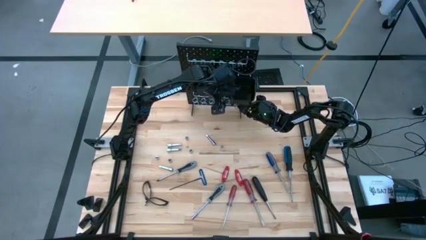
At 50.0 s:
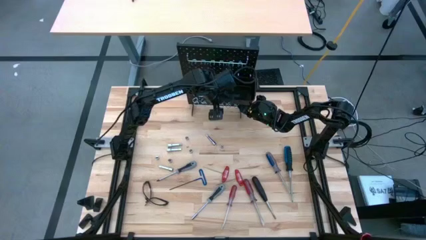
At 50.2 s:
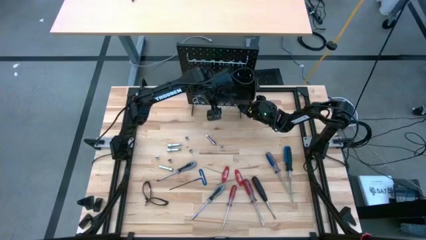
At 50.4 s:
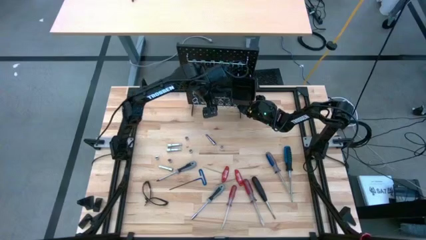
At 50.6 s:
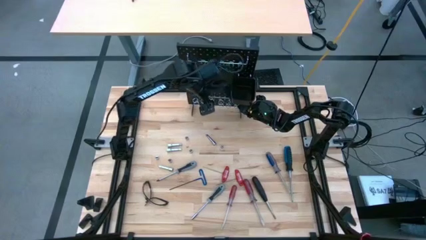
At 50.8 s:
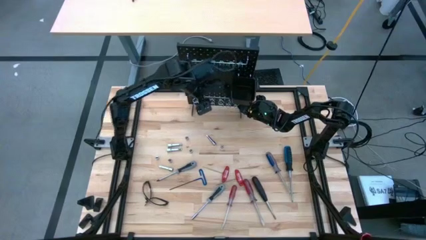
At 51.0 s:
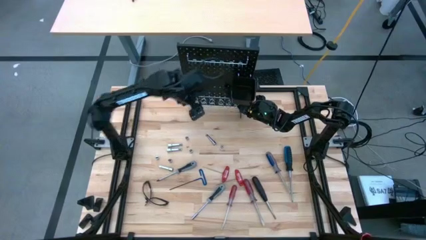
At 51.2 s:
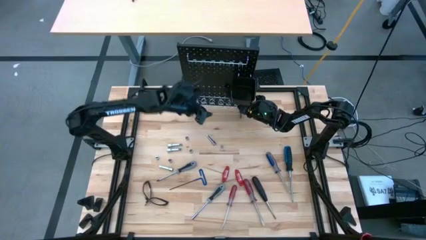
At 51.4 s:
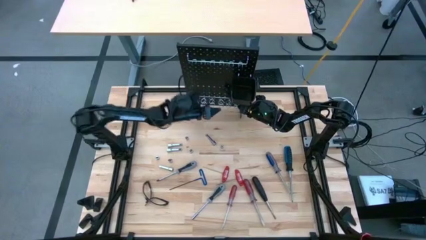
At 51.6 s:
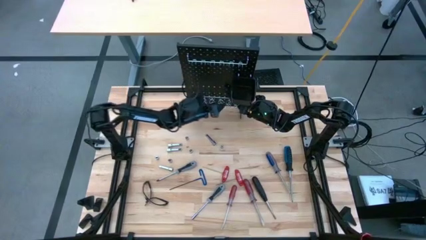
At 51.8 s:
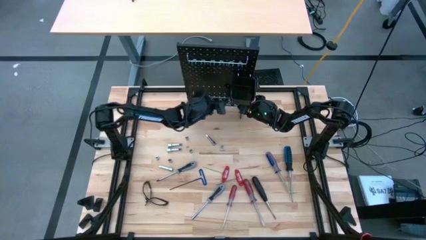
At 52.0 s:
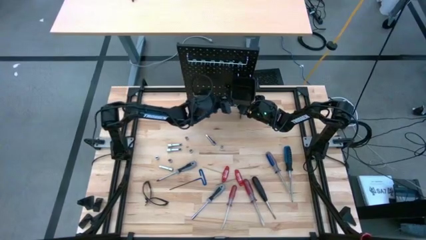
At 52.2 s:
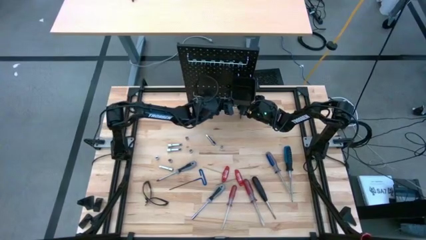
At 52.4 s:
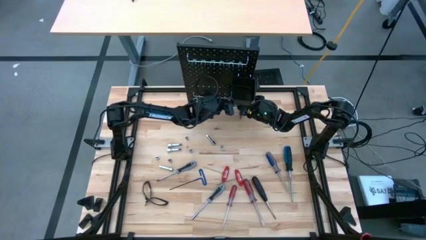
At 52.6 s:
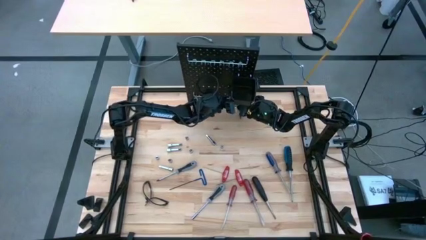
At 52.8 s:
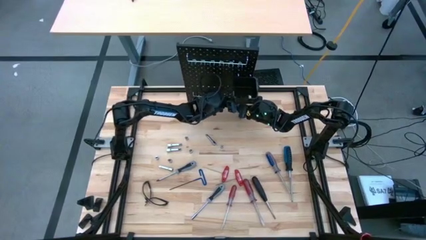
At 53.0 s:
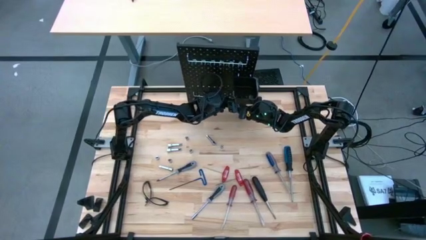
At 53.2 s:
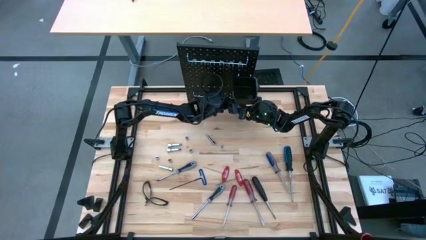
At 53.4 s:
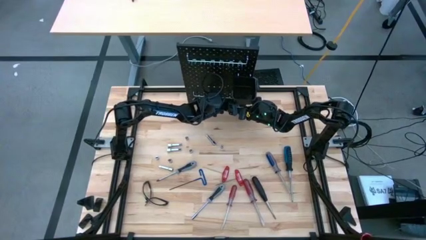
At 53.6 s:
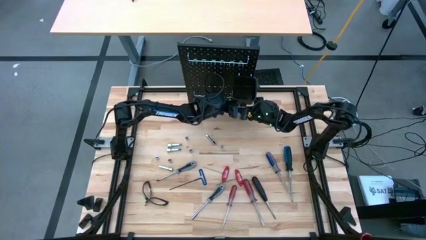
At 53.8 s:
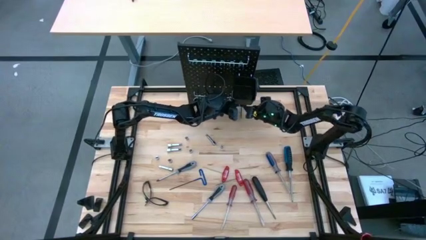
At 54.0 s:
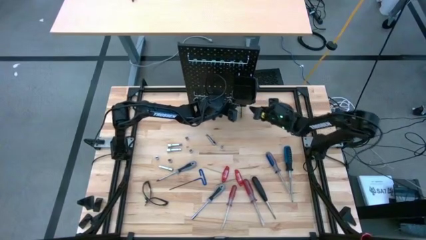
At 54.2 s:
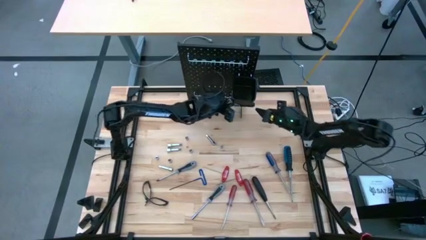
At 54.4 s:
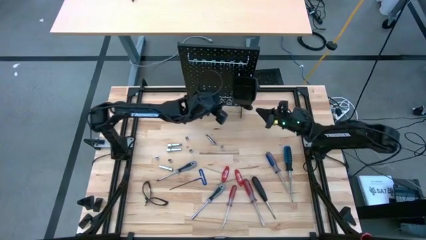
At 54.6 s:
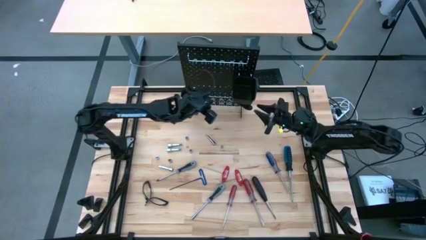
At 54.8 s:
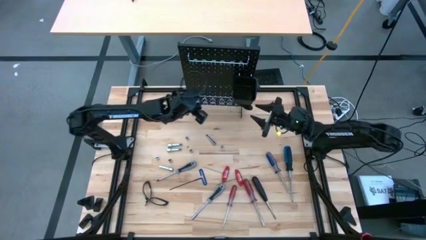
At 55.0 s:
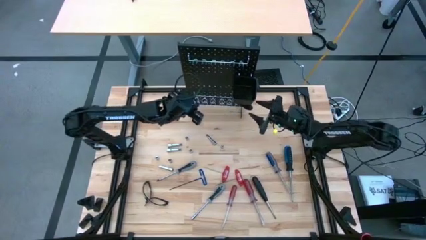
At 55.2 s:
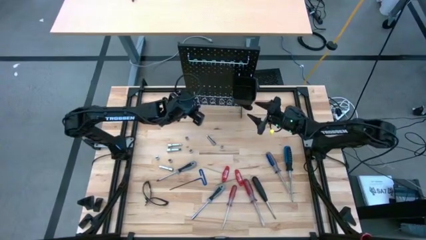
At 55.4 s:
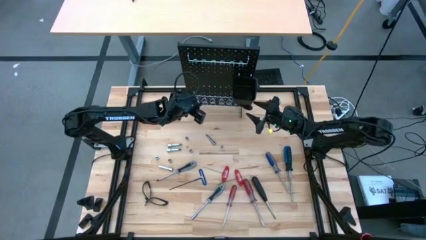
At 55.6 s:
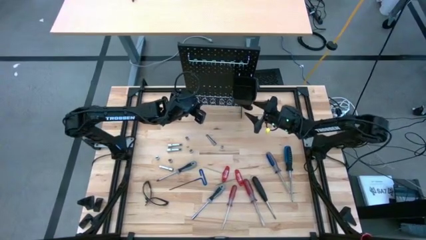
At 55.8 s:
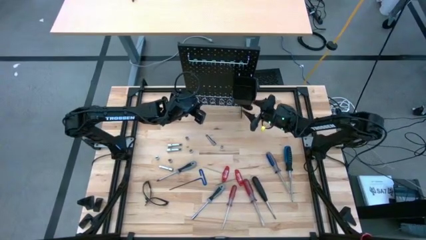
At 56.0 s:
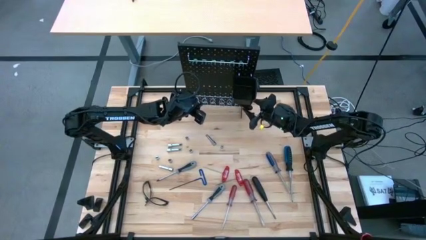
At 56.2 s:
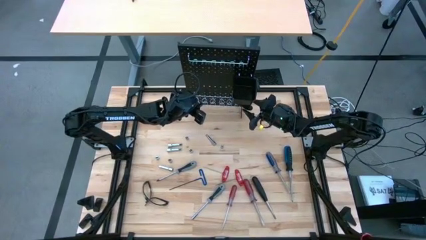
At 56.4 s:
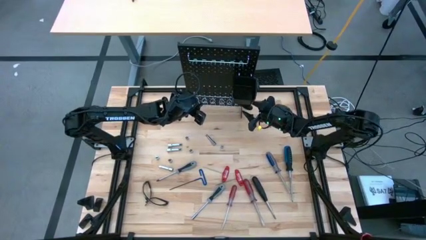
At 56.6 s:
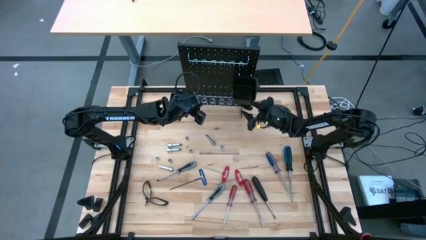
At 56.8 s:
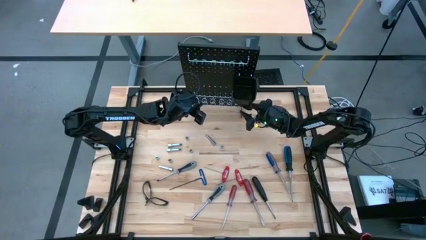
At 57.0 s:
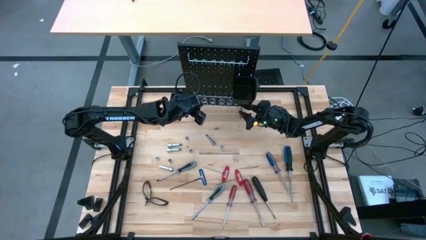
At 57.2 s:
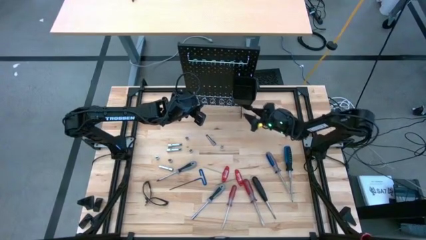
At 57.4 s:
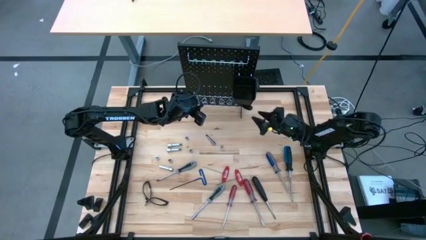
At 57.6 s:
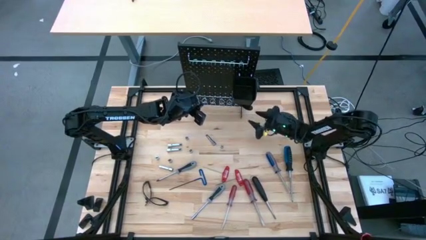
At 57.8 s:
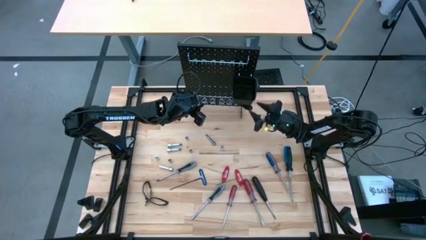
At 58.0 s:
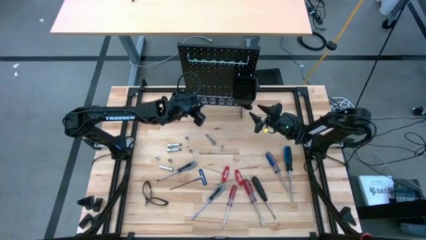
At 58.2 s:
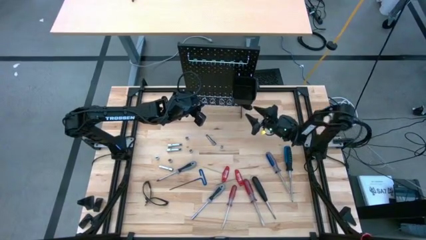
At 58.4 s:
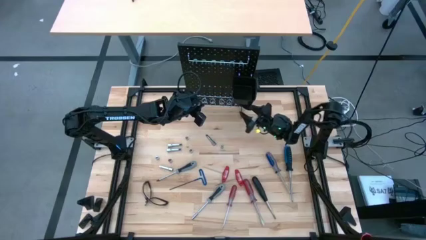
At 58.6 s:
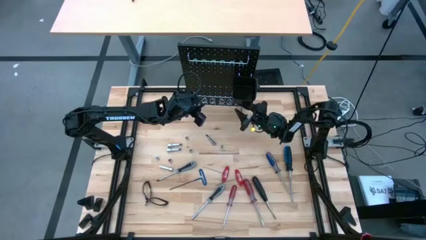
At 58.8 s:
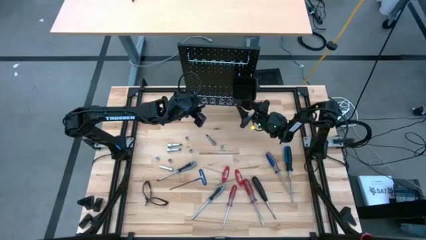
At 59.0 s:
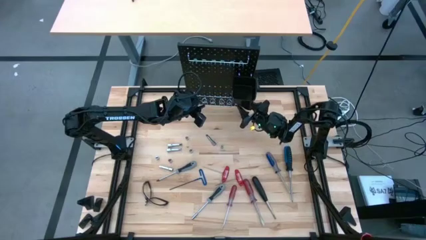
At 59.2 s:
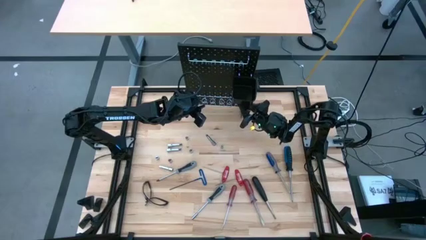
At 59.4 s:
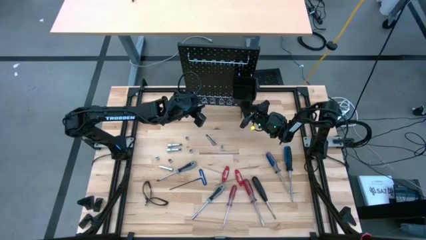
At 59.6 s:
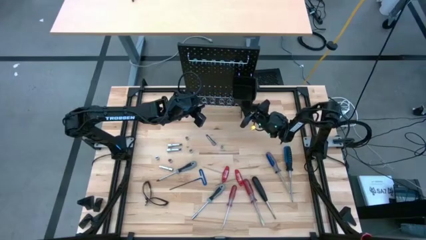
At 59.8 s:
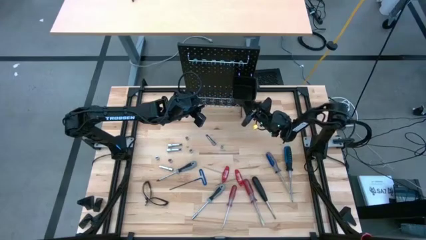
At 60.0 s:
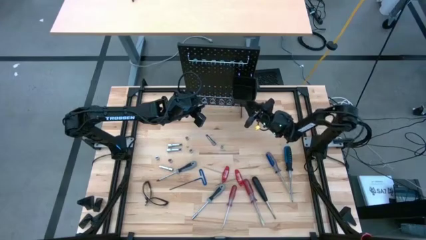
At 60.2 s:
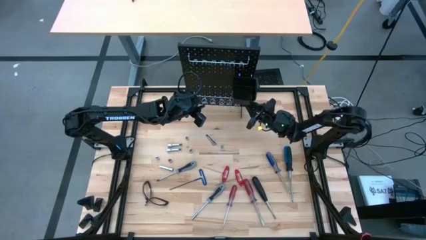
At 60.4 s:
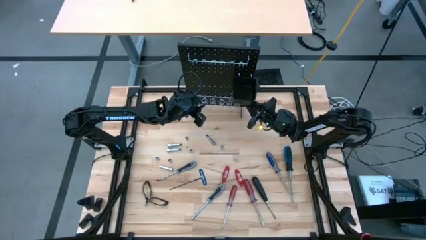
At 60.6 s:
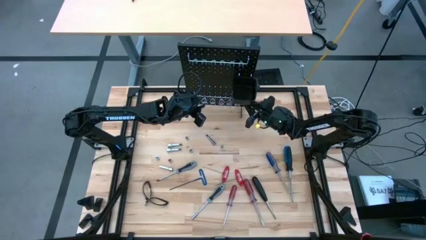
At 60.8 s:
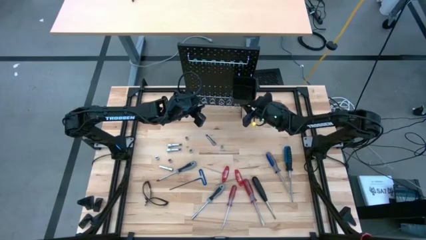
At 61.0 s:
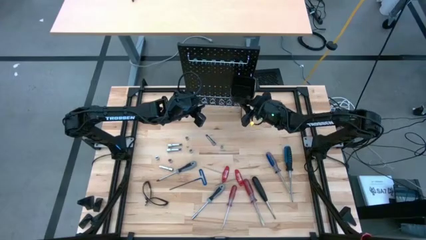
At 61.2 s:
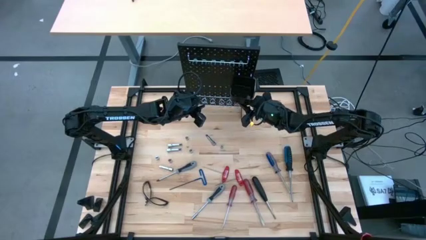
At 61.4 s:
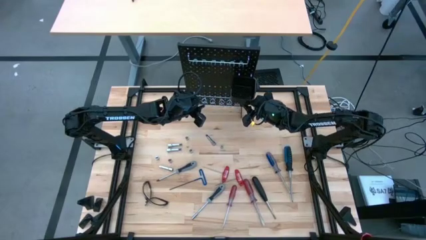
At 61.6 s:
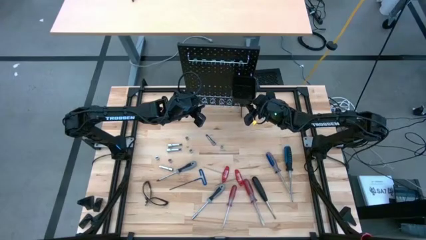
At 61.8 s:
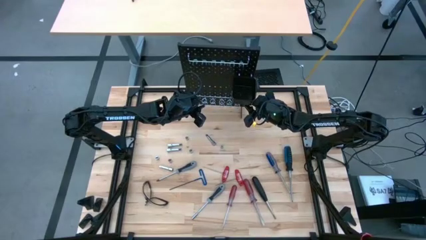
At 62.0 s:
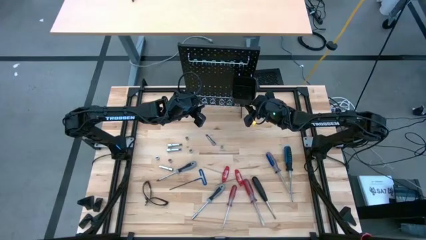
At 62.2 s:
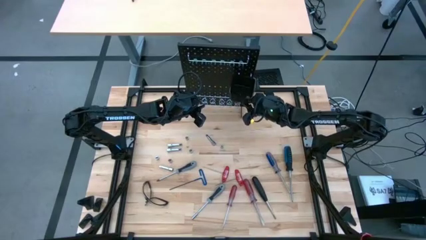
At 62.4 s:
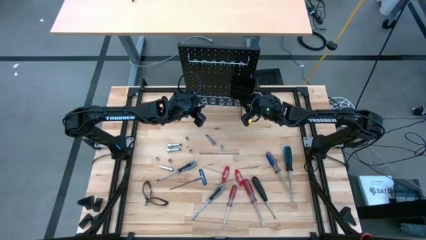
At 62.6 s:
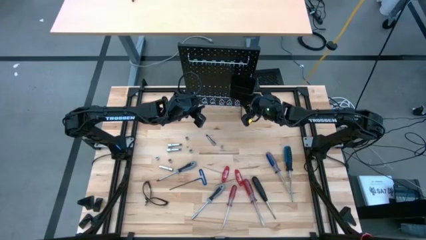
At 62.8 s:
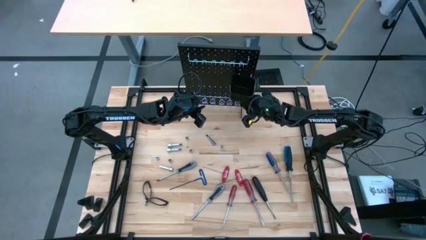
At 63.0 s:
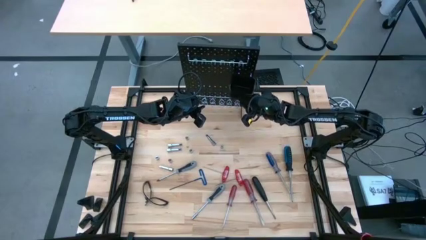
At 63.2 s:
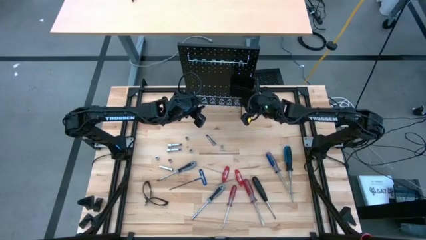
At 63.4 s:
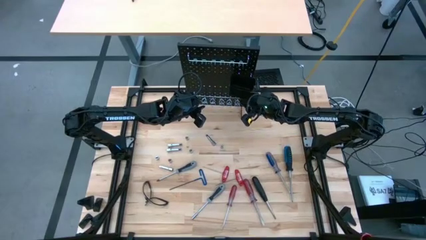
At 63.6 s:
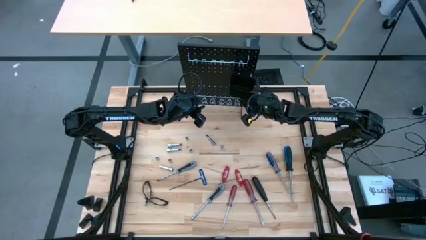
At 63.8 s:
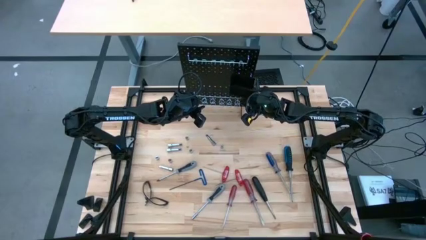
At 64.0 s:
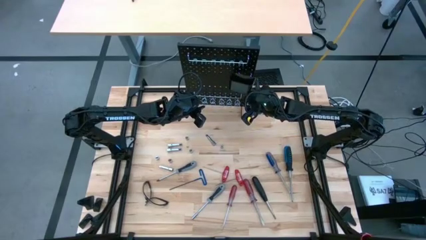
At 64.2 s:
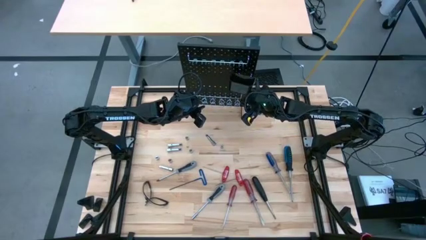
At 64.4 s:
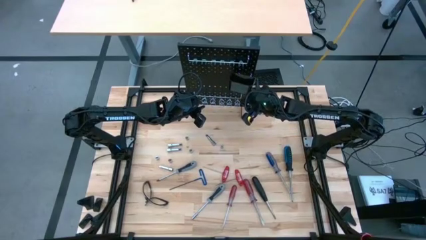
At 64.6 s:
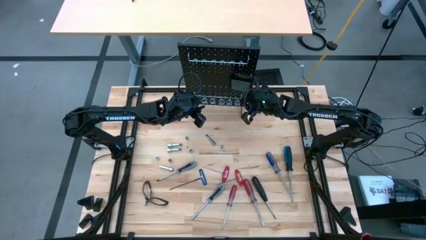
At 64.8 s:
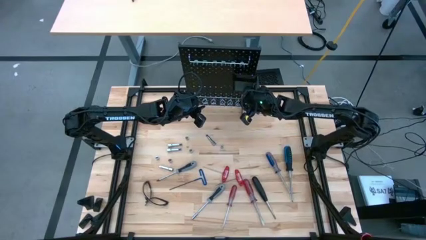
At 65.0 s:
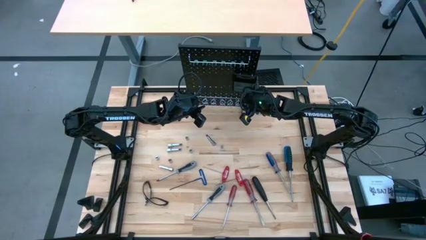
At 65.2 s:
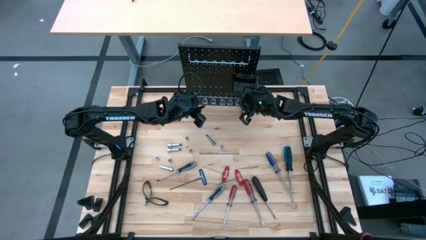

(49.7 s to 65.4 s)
Task: Hang tools onto peg board
Hang the black screwdriver on the pegboard
